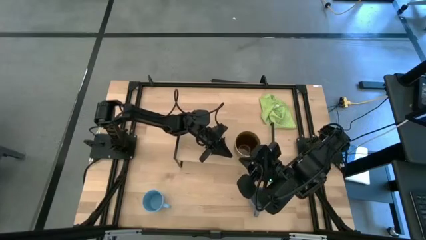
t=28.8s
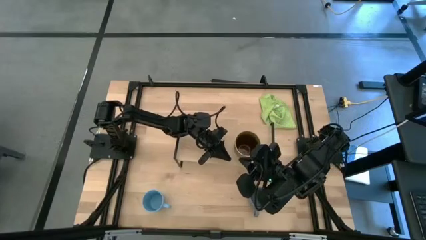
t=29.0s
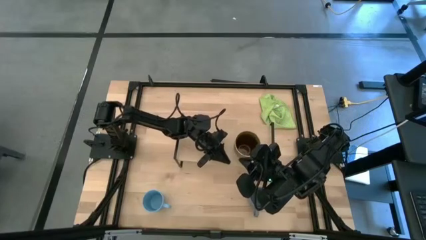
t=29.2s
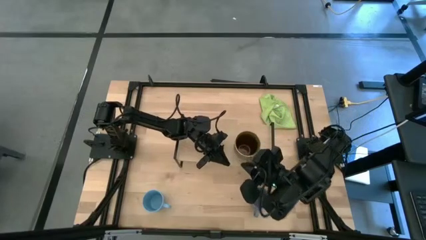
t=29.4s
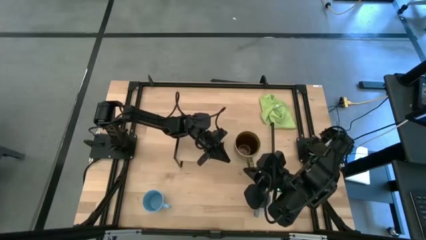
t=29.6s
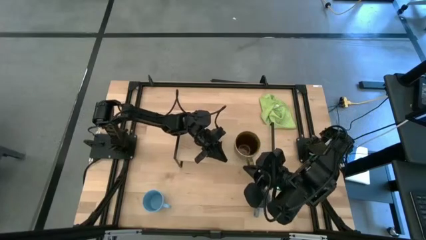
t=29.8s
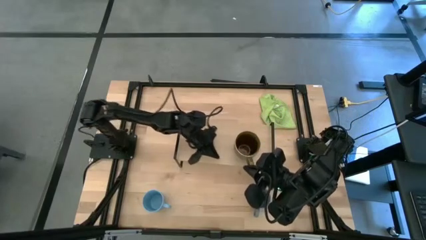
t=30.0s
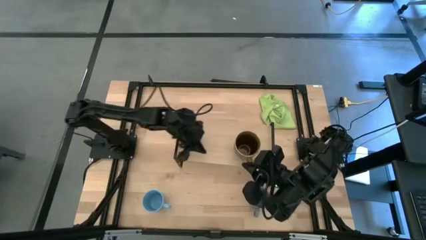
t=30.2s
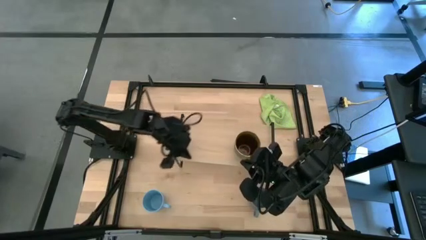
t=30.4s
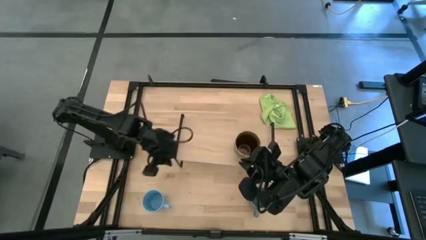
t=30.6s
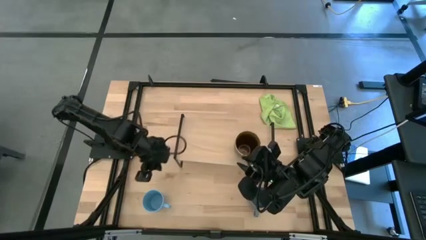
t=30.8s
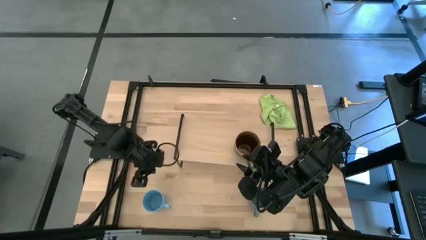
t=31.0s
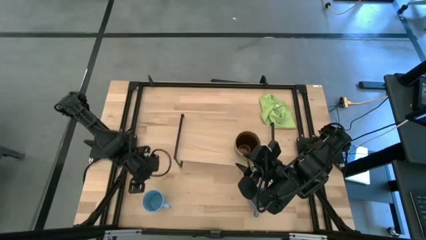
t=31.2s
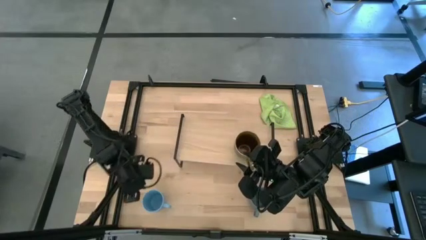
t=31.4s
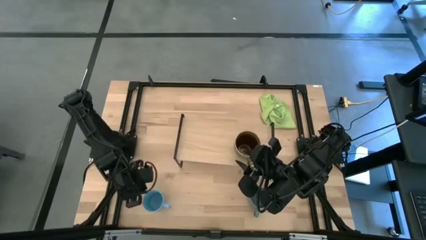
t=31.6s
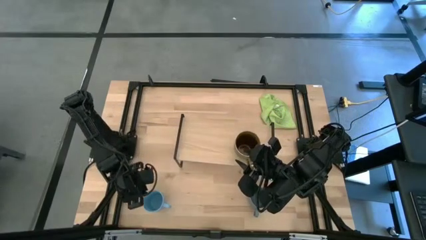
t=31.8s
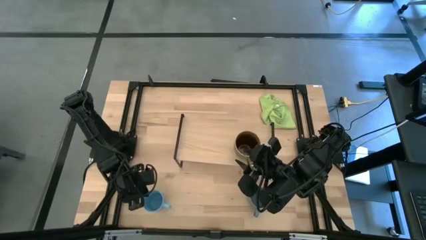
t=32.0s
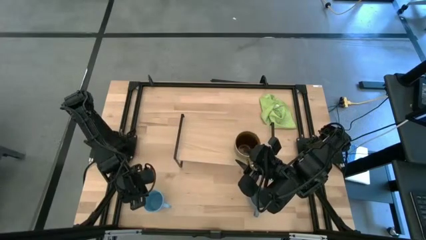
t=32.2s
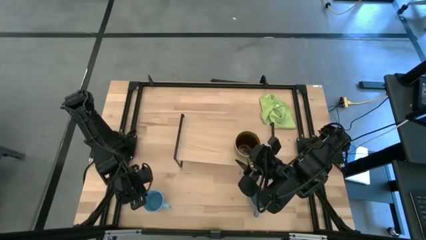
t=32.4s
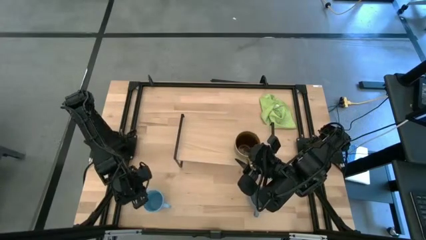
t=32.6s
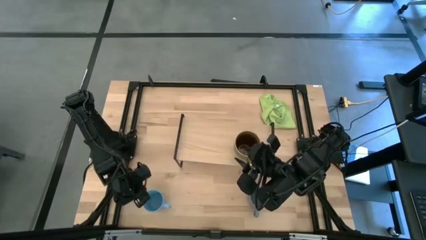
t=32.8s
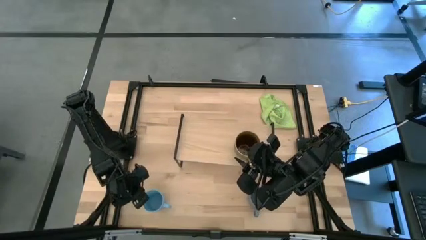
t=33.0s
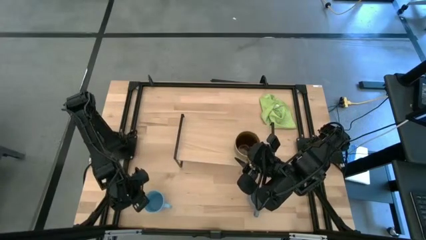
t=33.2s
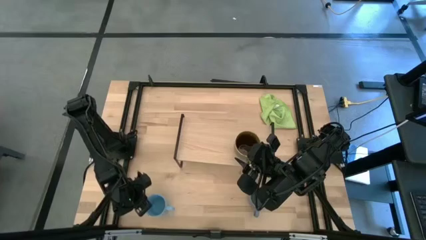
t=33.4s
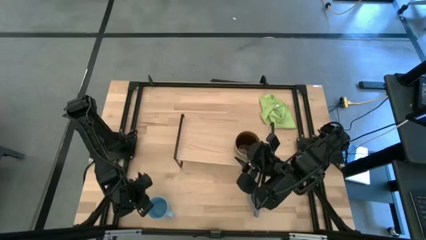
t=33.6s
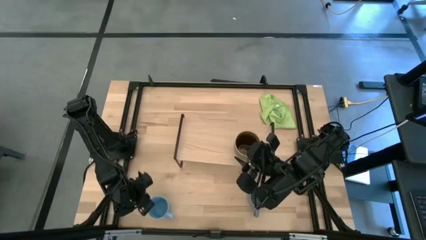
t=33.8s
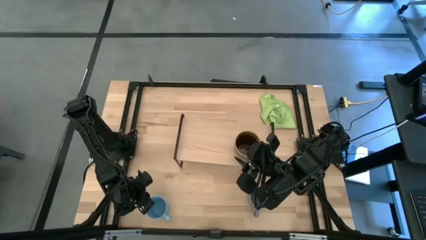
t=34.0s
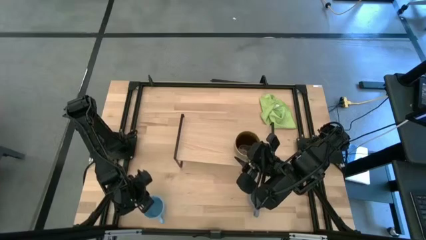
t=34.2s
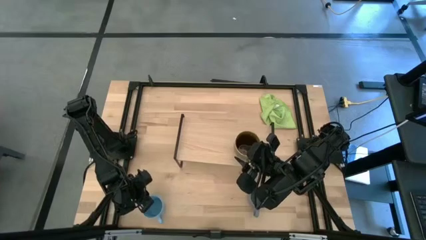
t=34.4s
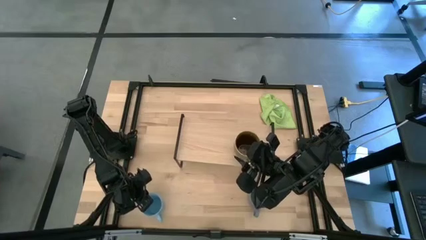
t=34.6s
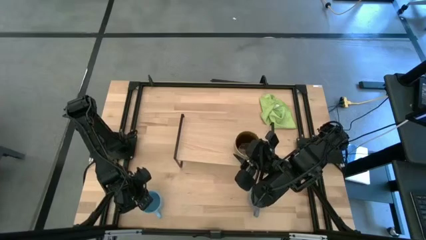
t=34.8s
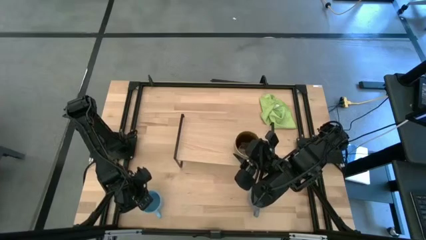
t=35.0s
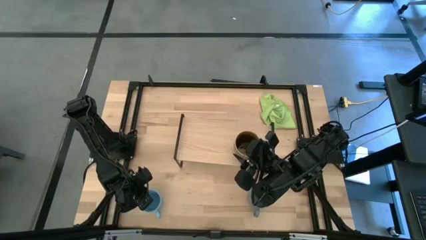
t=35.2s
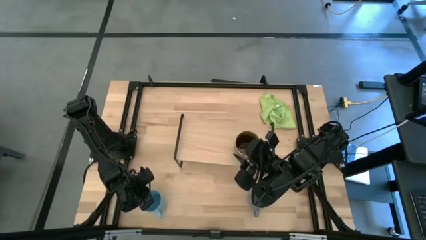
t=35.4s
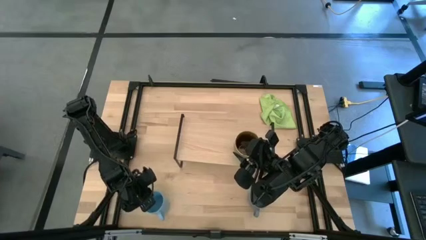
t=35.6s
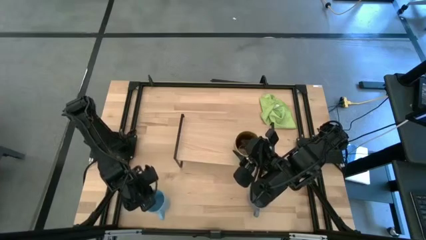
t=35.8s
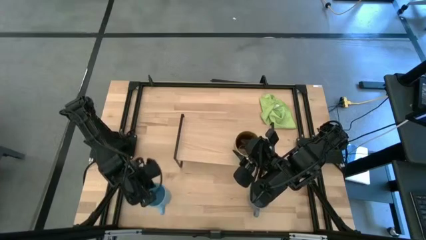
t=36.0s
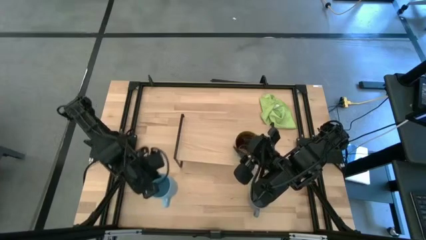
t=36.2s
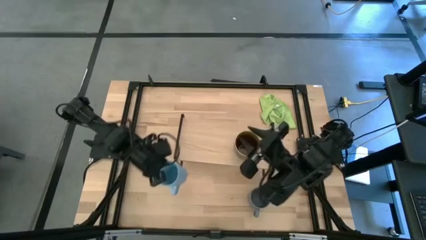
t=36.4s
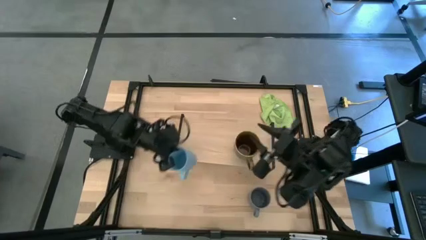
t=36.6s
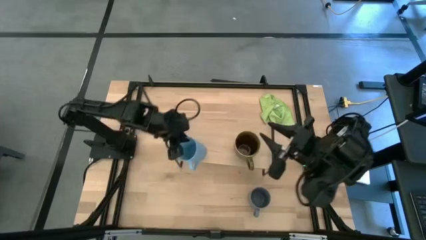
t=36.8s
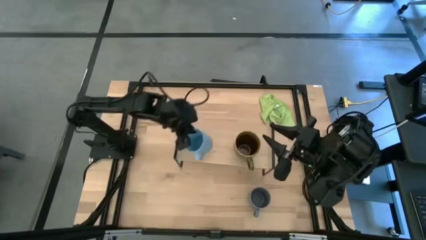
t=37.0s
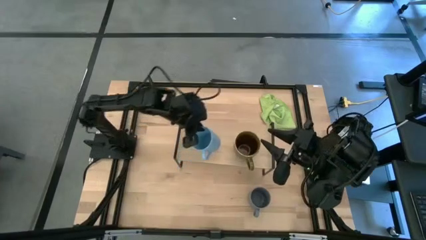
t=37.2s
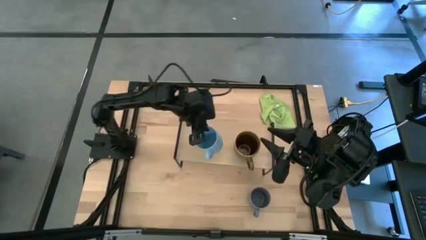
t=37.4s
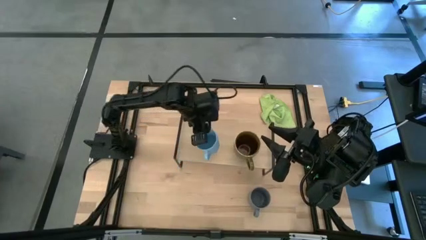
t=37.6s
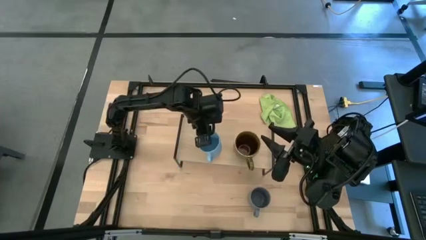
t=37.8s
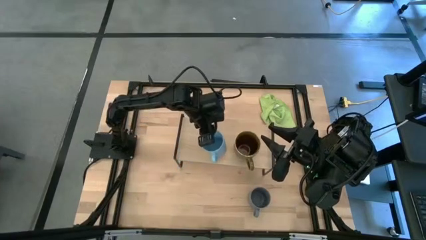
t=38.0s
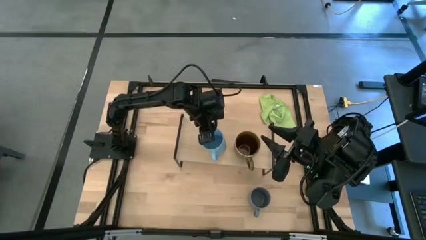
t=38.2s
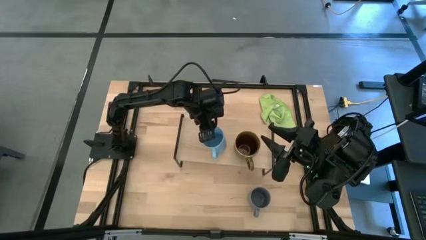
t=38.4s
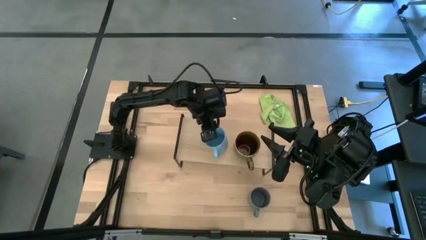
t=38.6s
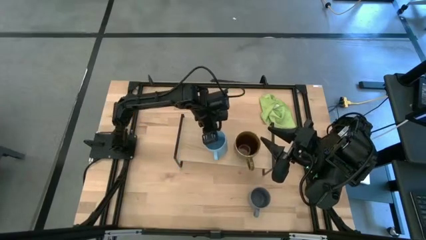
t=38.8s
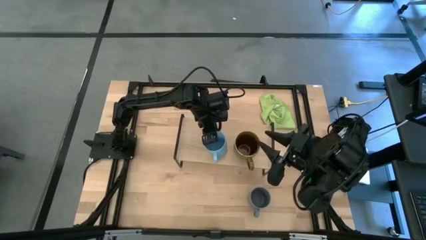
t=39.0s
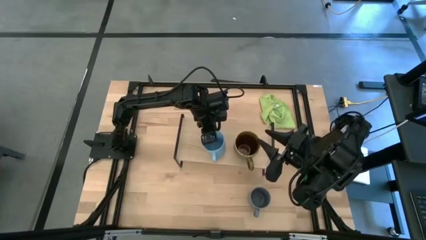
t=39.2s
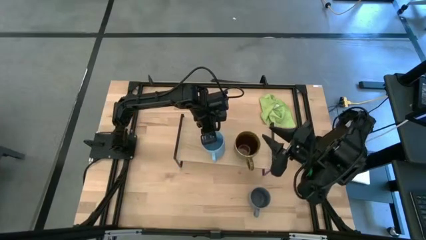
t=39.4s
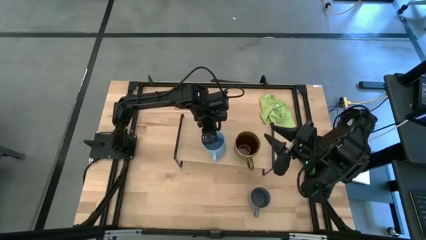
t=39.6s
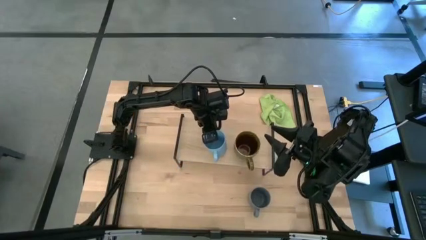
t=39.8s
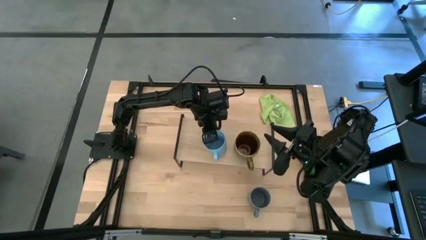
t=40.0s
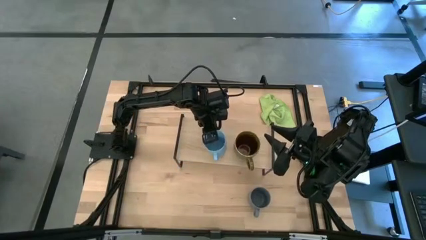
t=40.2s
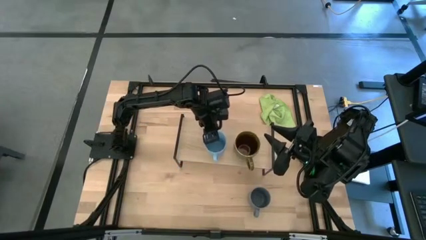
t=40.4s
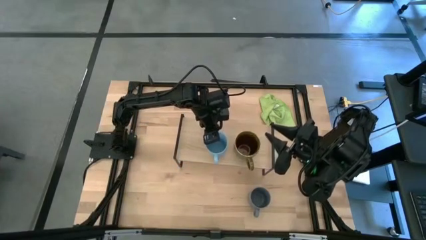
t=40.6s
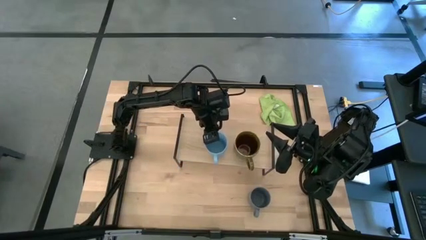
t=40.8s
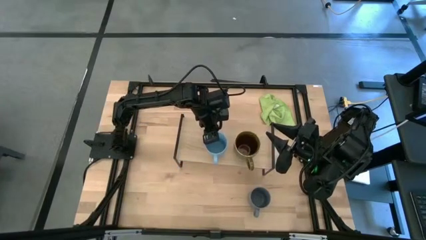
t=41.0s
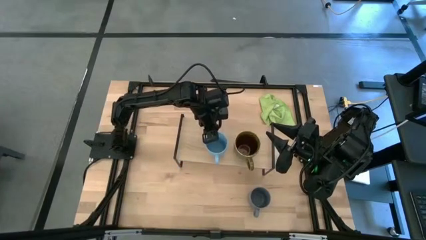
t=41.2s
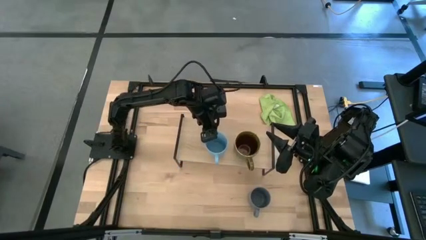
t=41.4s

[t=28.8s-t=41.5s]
Task: Stack small to large cups/mugs on shelf
Put the light blue mug on the shelf

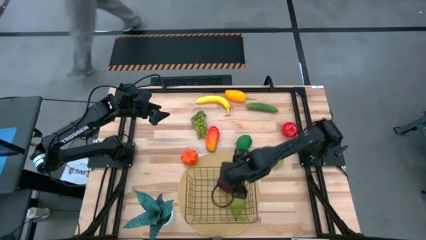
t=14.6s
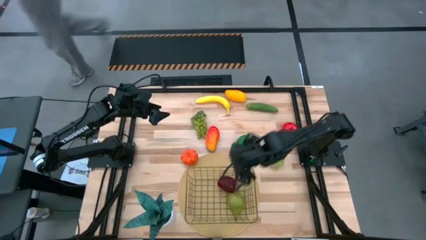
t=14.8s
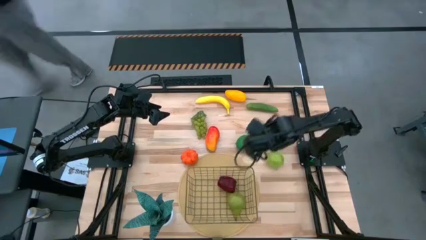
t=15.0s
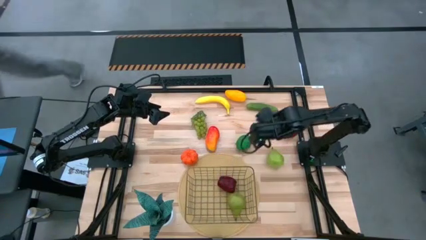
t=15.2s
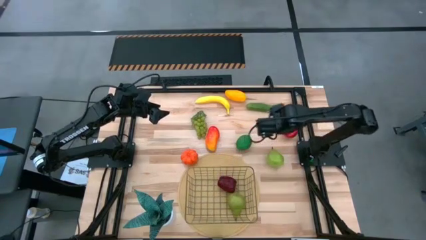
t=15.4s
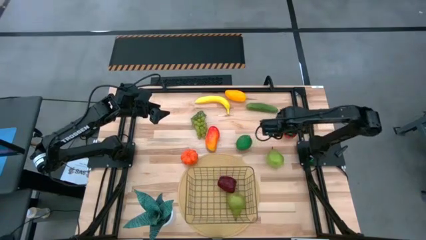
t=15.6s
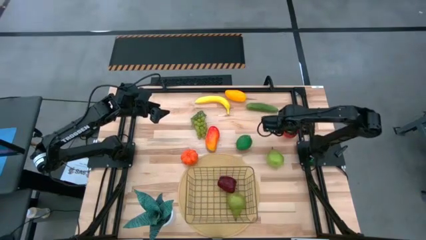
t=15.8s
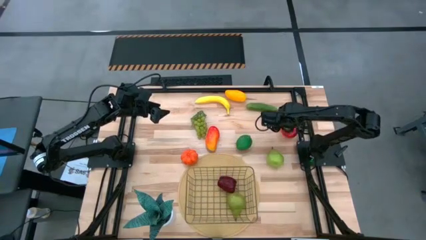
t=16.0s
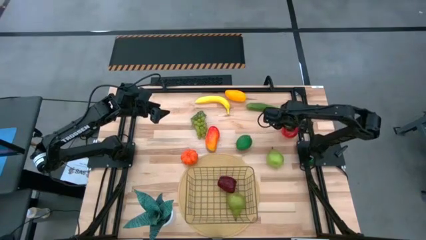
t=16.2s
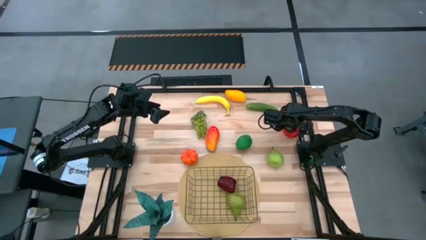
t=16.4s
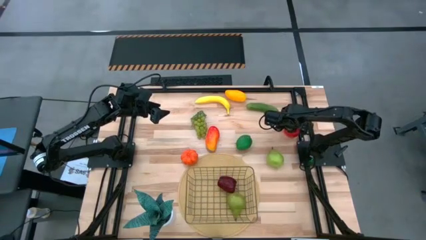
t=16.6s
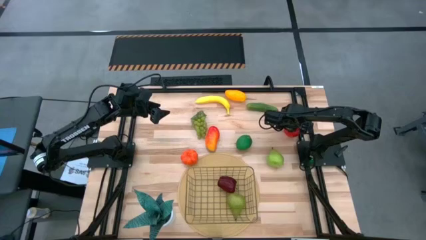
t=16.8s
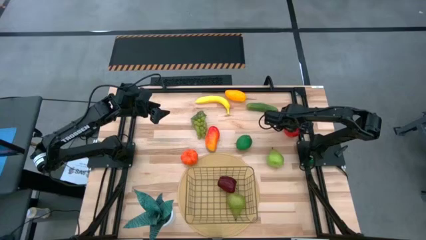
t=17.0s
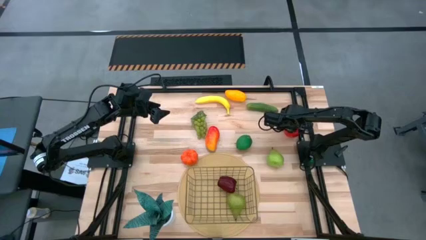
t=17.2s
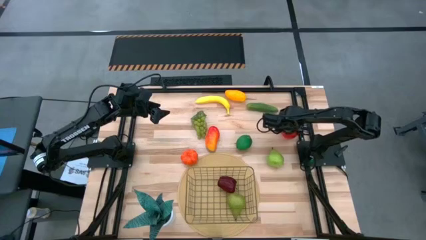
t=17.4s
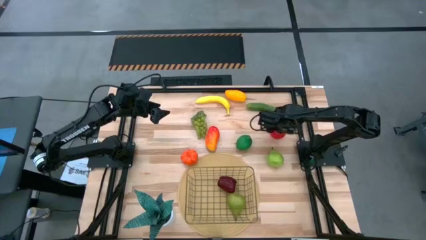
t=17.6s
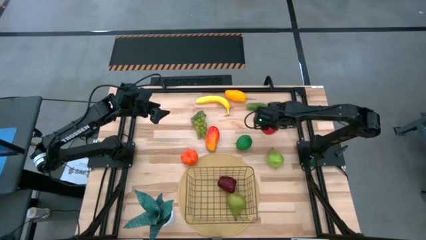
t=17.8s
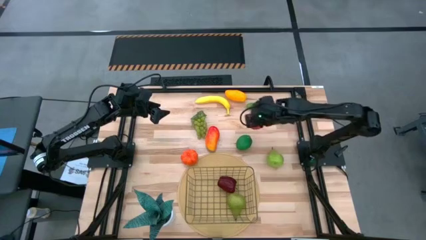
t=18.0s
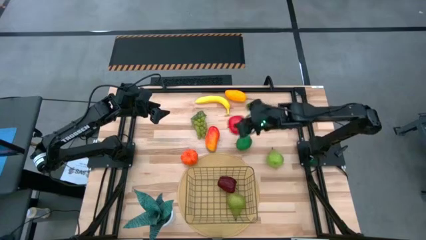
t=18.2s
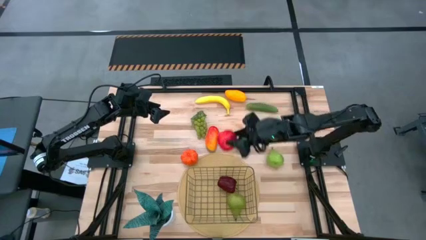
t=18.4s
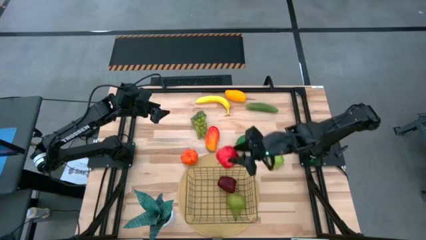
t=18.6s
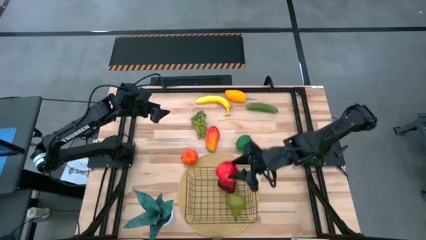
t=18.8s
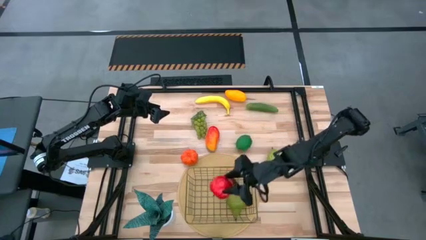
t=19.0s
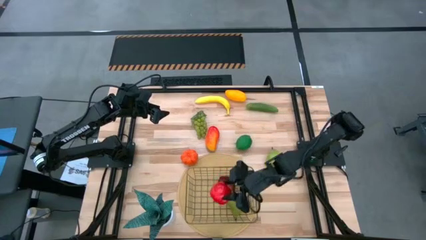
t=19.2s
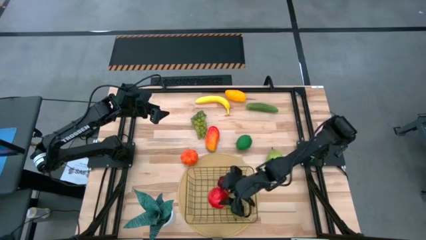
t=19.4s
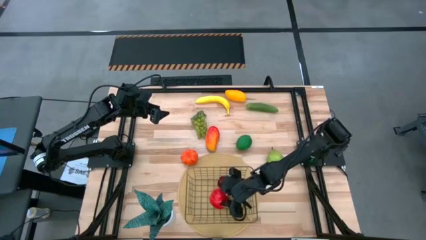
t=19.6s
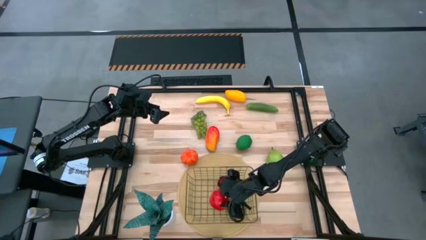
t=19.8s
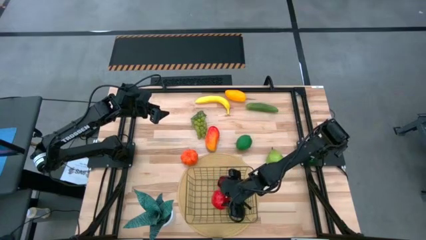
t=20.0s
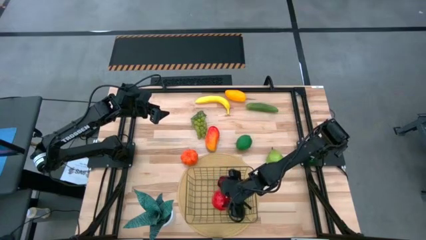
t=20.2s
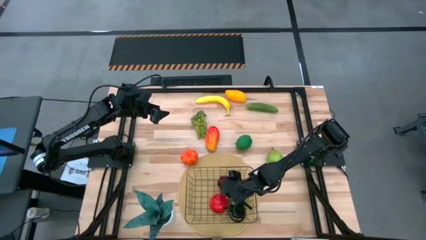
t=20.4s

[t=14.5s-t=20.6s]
Task: Build produce basket
Put the red apple into the wire basket
